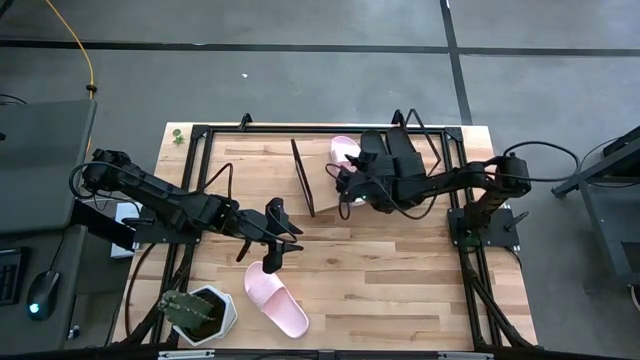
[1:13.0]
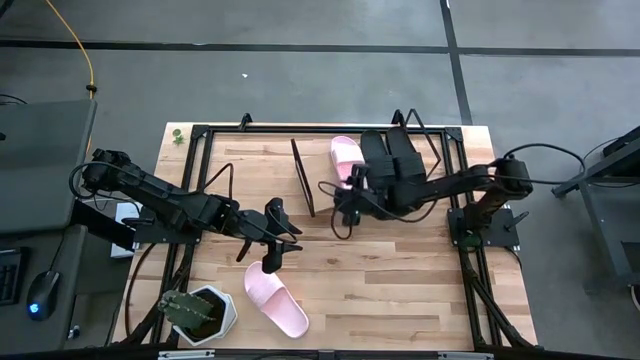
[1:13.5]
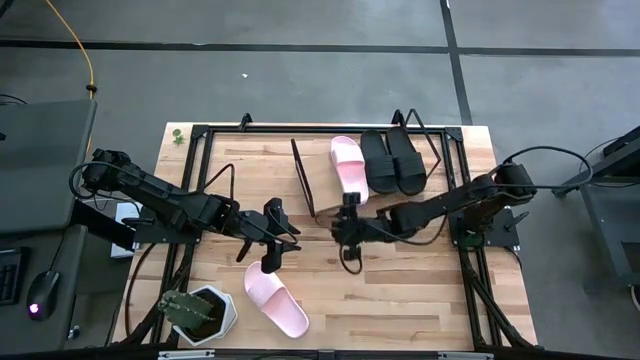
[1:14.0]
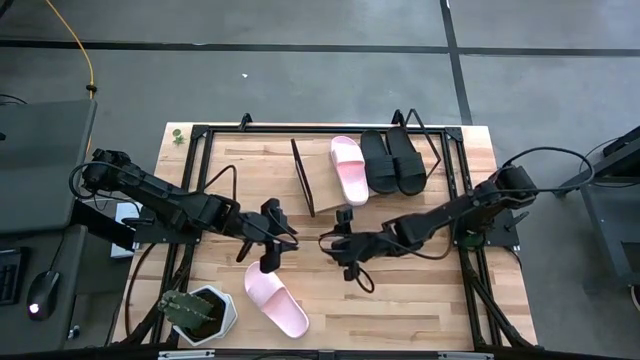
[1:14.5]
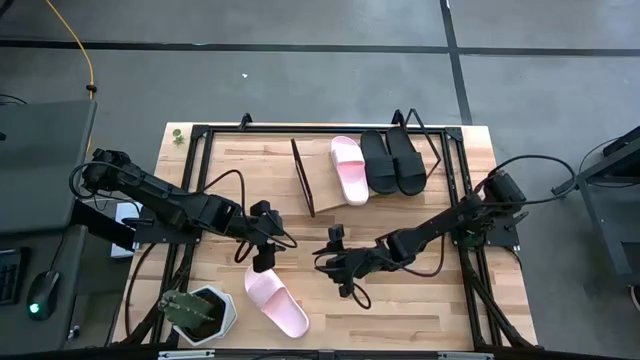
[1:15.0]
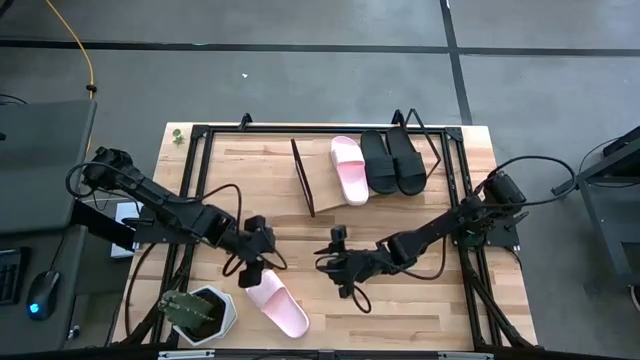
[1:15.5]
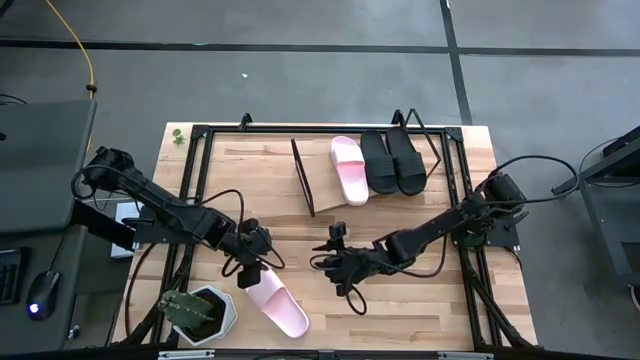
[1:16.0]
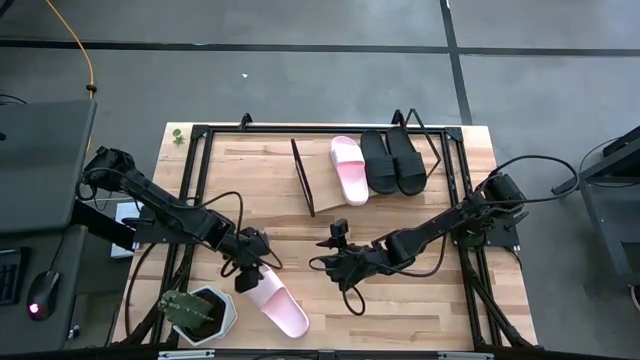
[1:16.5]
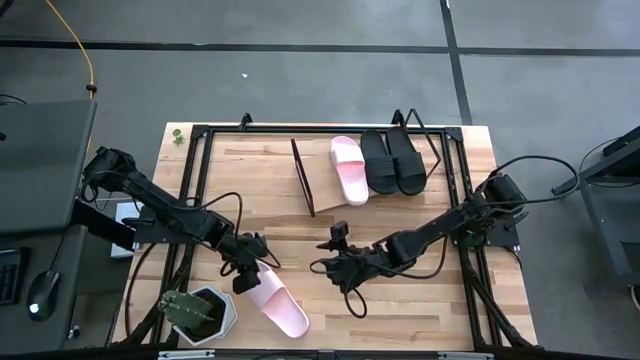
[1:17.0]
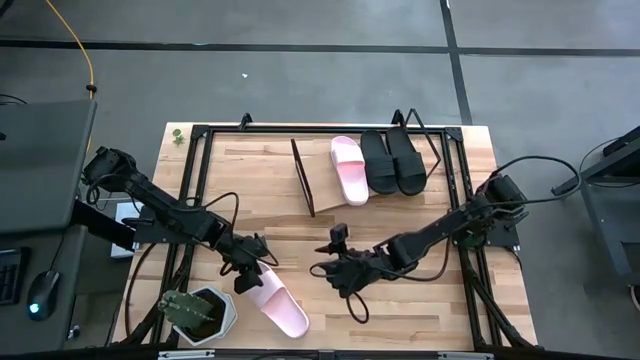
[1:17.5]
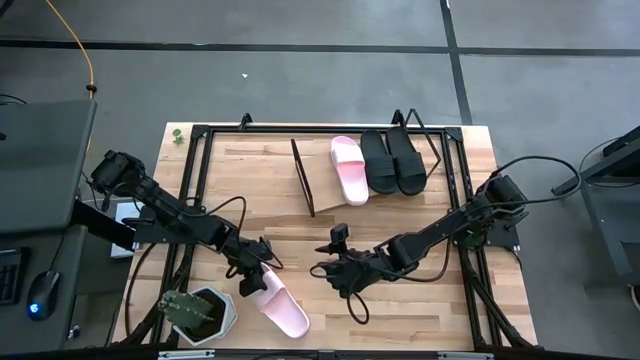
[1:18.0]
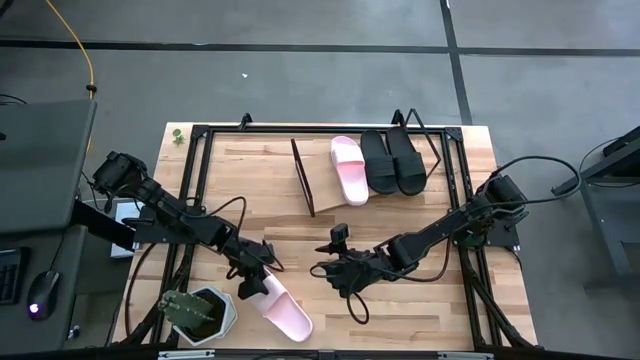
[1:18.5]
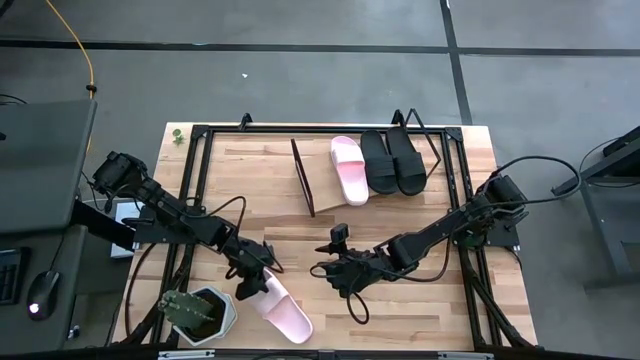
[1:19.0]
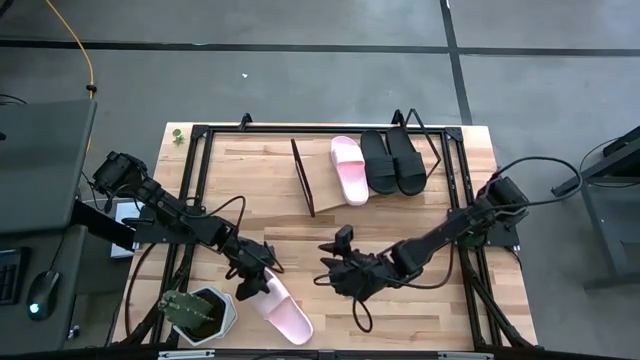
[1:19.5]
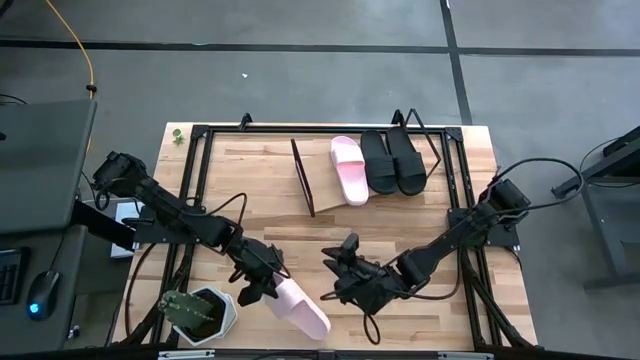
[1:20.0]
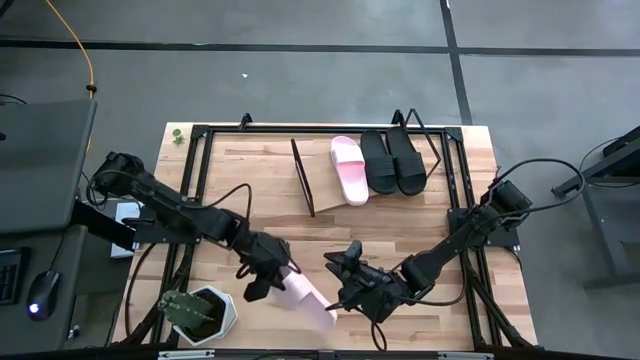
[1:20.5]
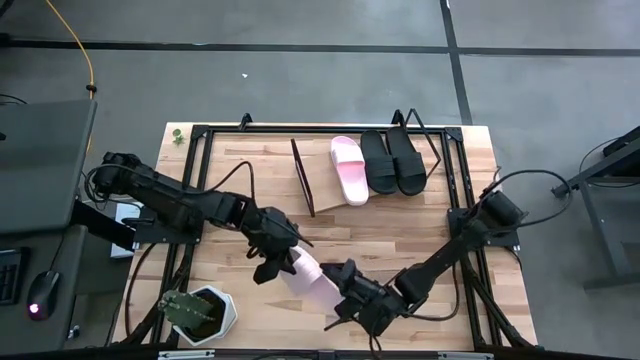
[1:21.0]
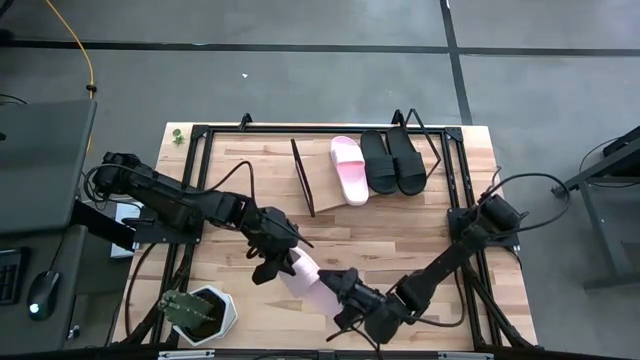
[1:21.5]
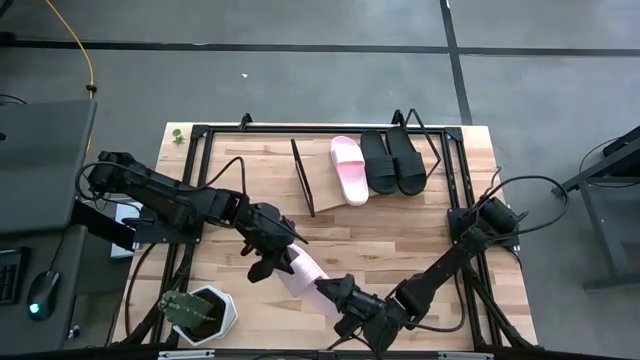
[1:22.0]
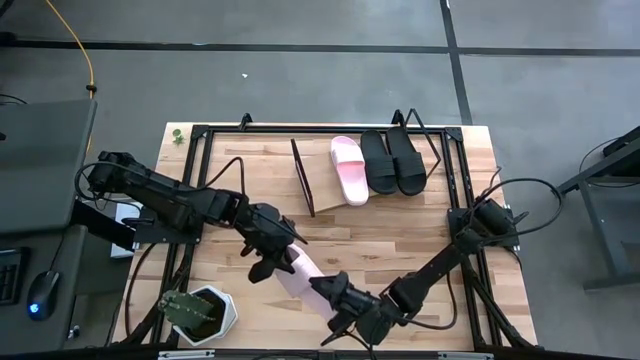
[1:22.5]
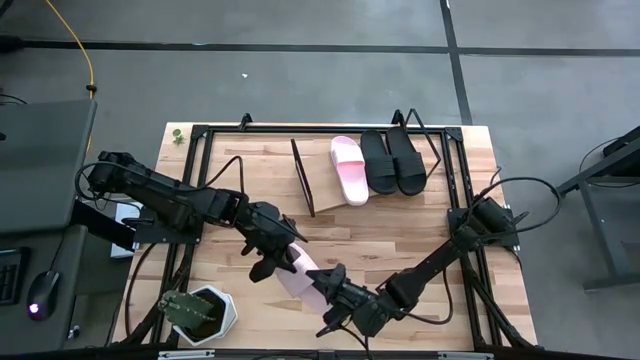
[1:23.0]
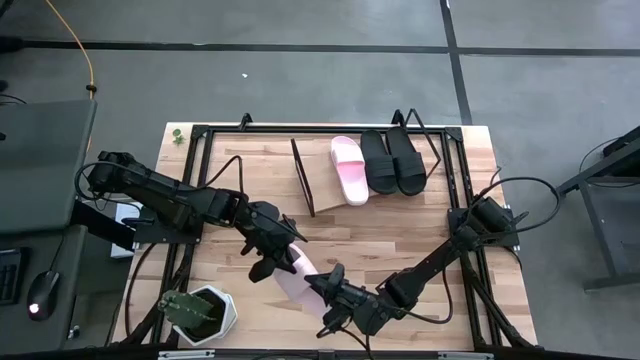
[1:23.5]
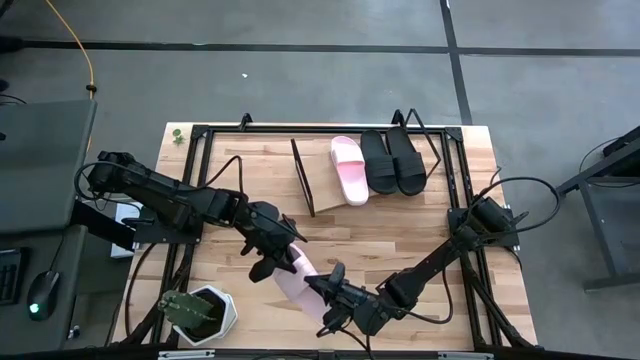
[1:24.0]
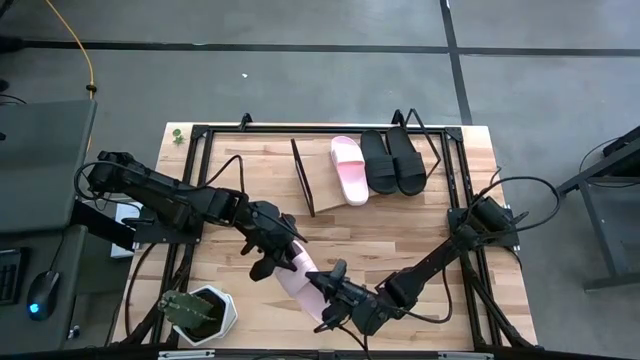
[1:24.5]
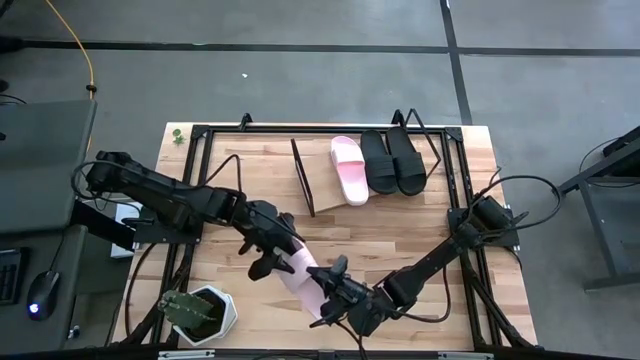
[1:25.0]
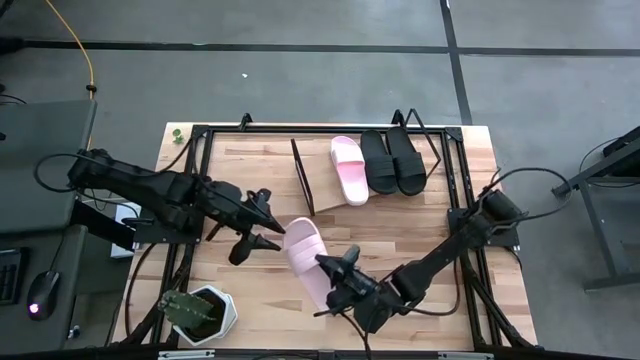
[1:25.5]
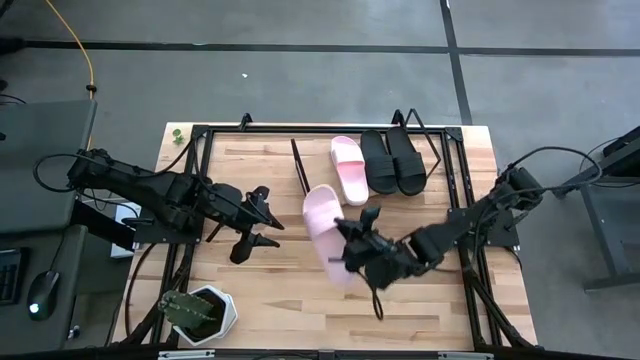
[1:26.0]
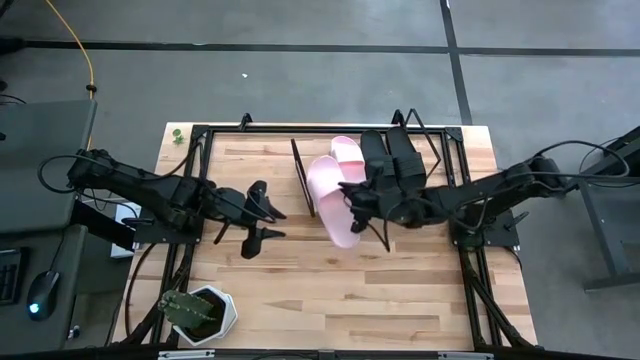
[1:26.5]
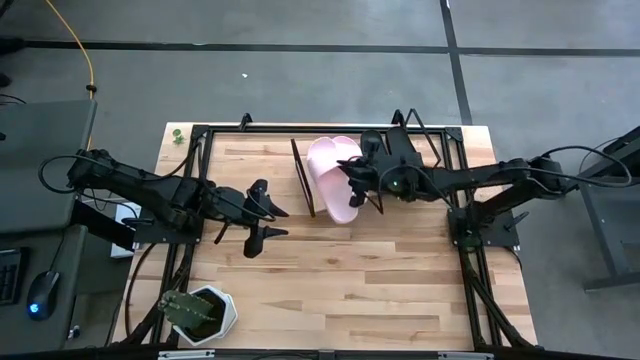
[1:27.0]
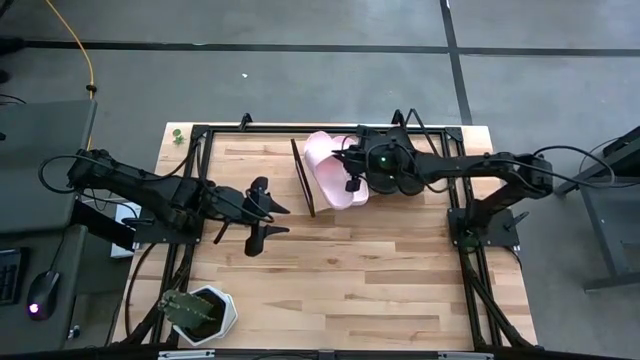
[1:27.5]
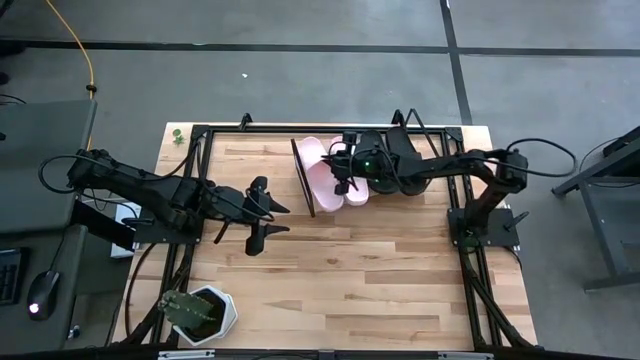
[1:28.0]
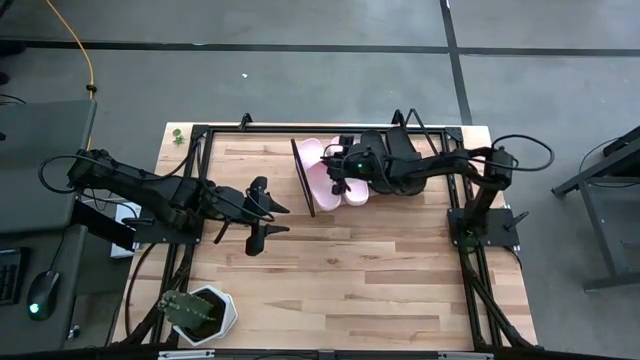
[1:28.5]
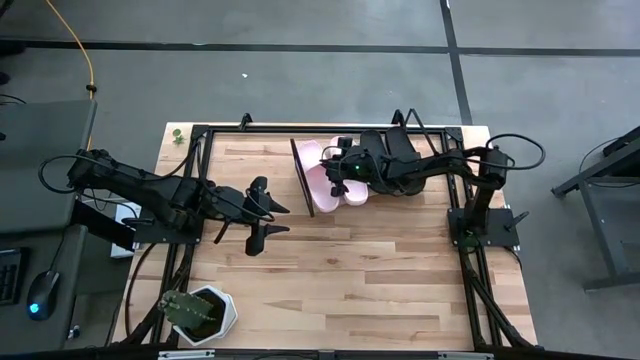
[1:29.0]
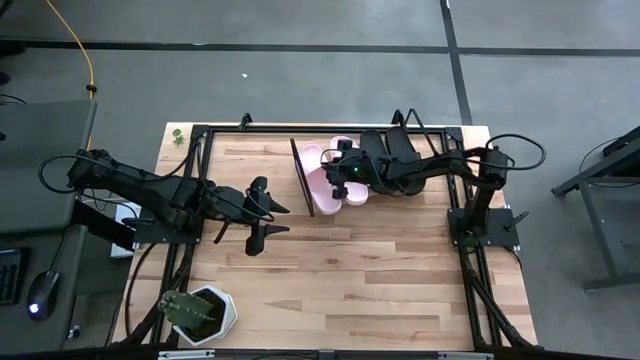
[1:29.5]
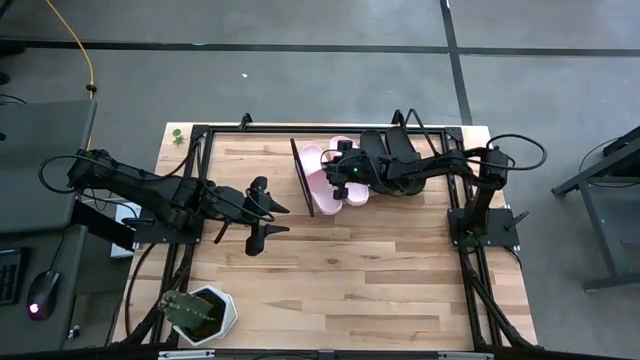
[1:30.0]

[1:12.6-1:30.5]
Task: Pick and place slides into the shelf
Put the pink slipper on the shelf
